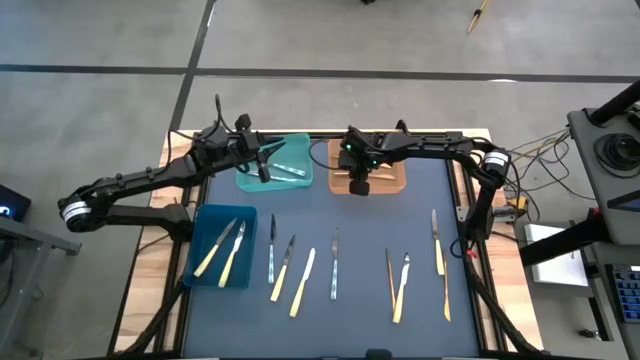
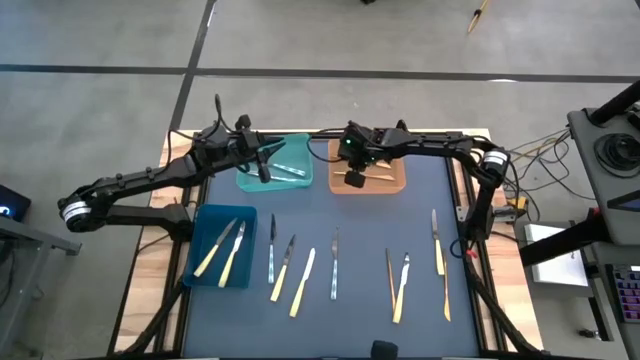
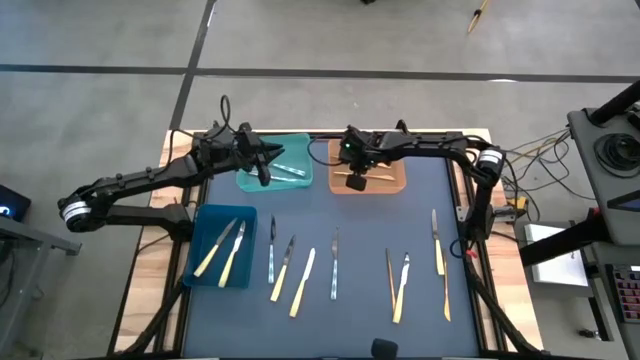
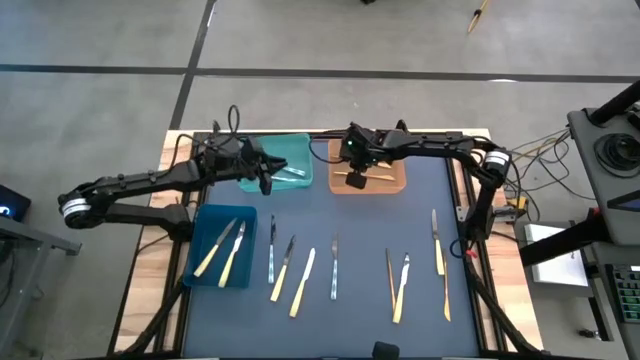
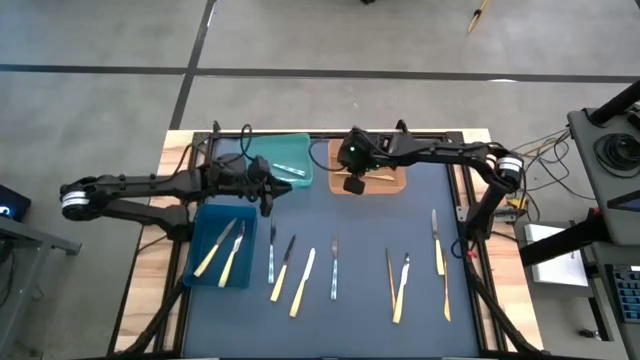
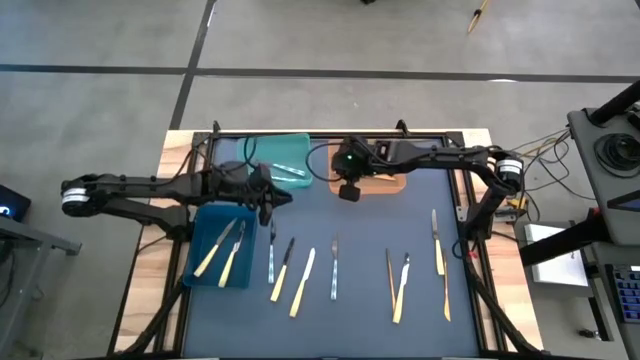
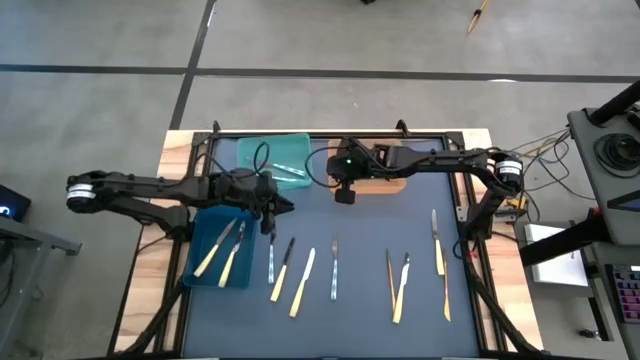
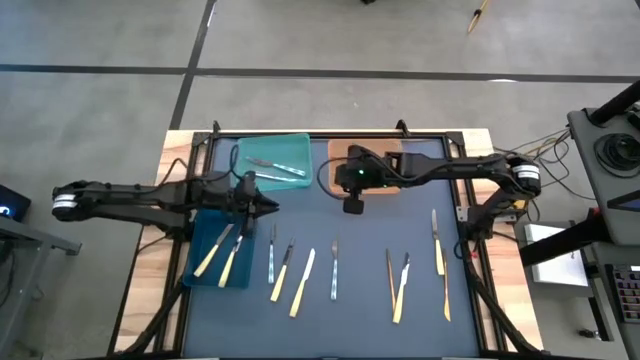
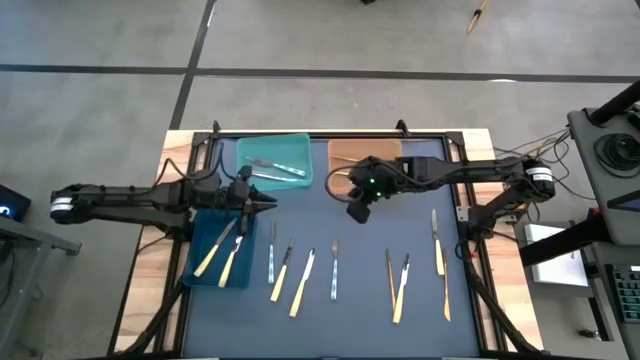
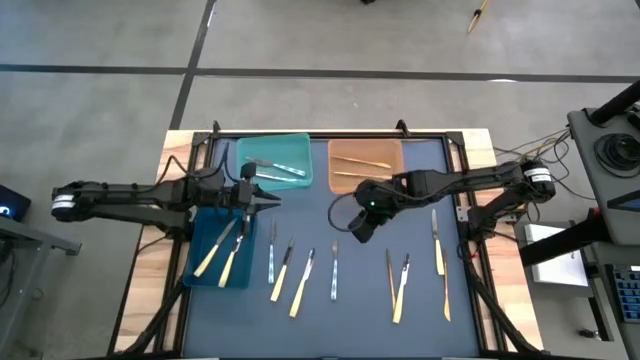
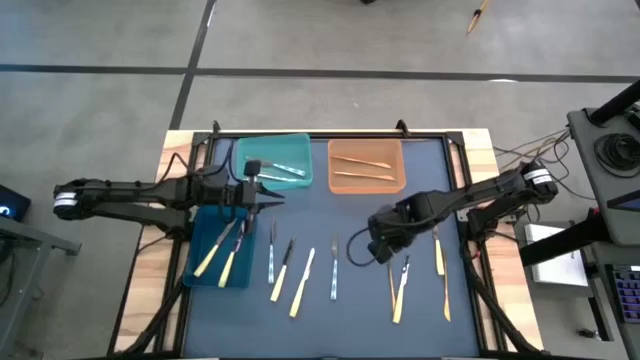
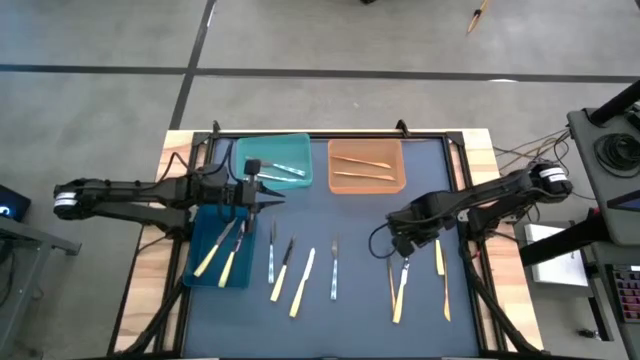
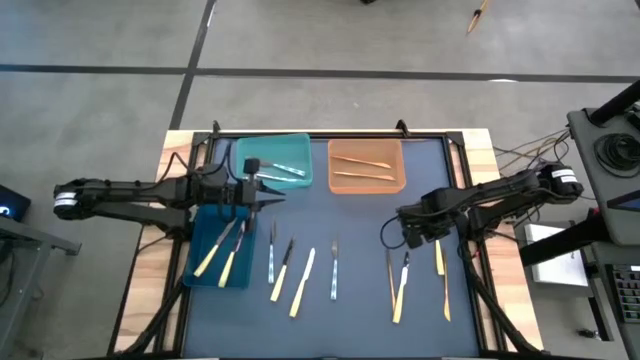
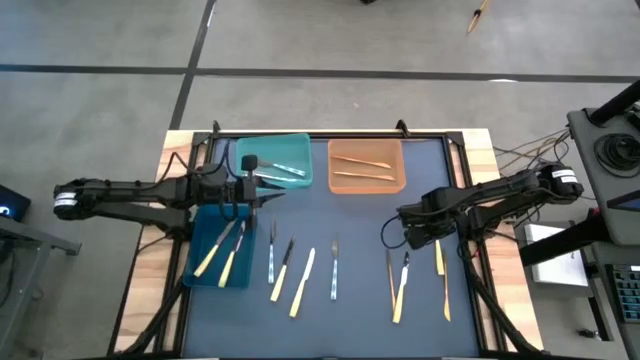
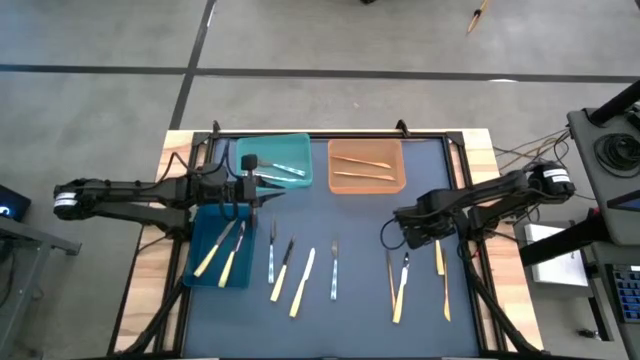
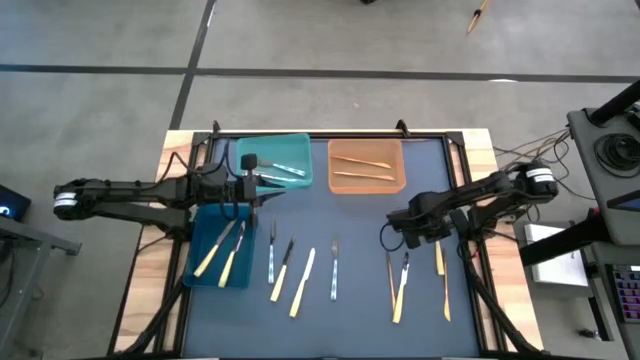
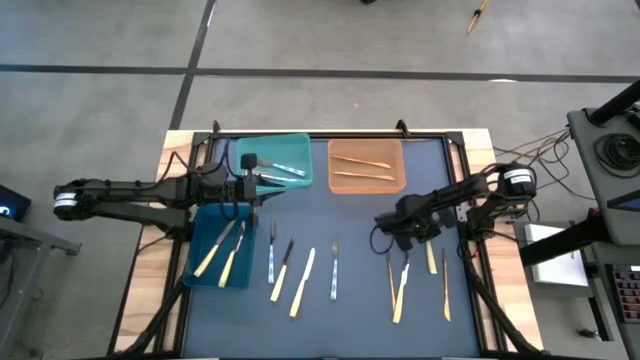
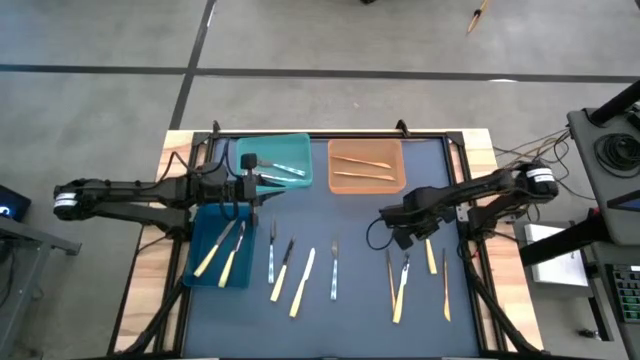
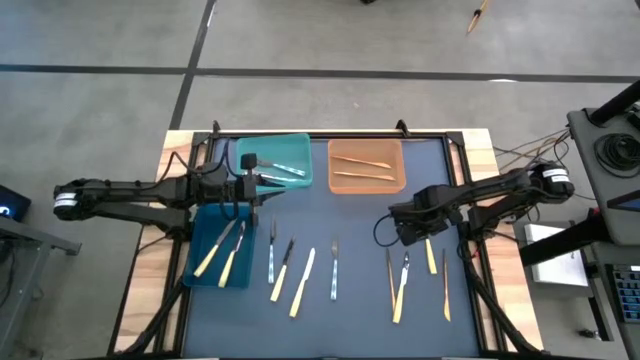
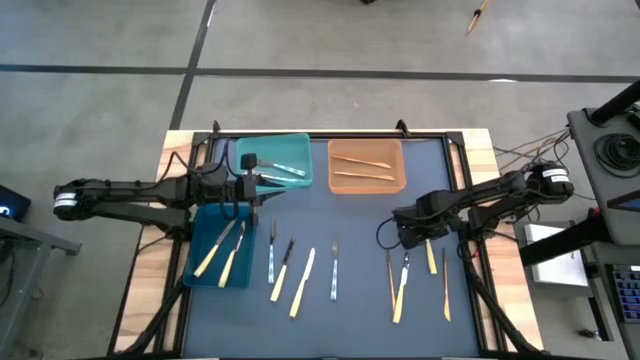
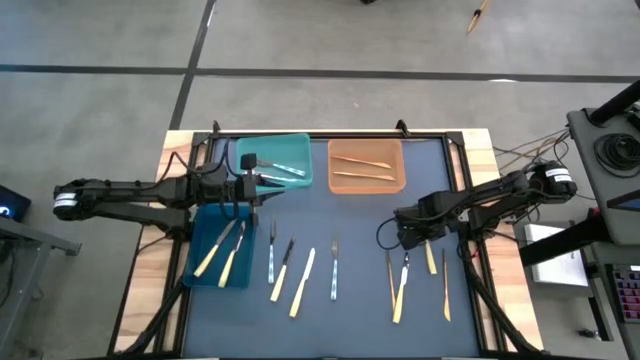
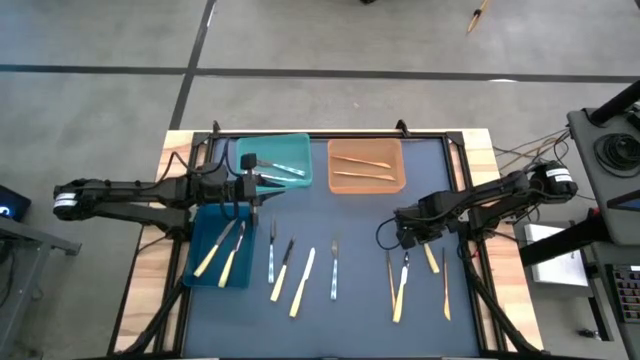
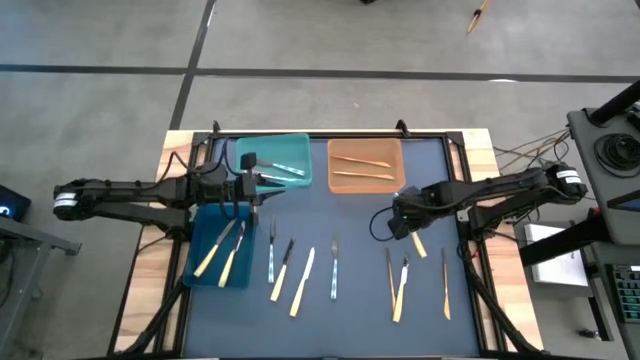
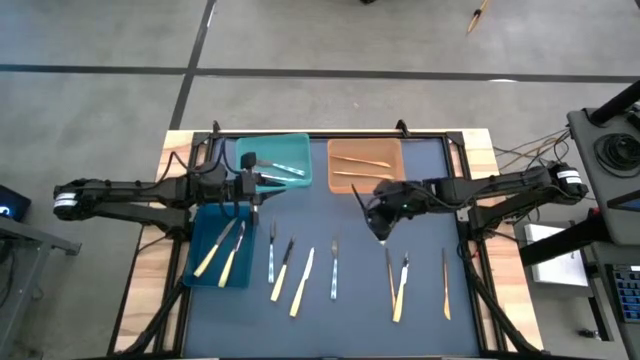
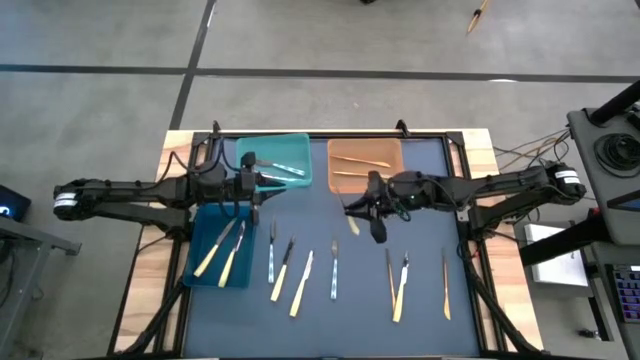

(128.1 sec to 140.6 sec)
Task: Sort silverware by color (type)
Put the light yellow knife into the blue bin

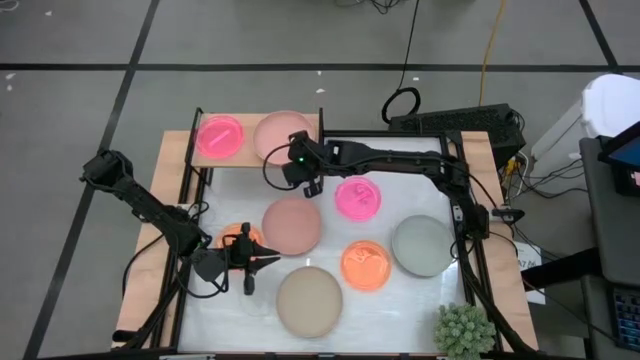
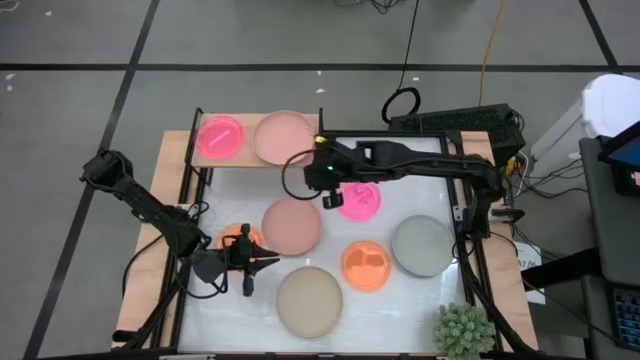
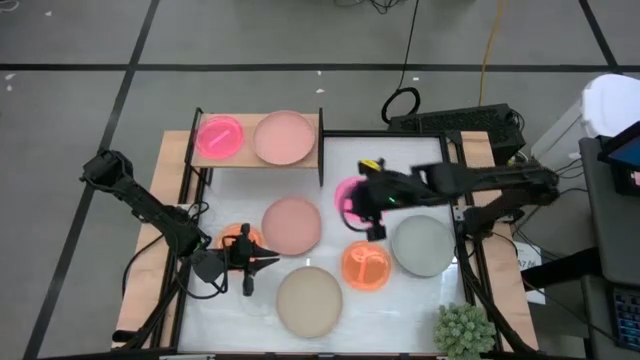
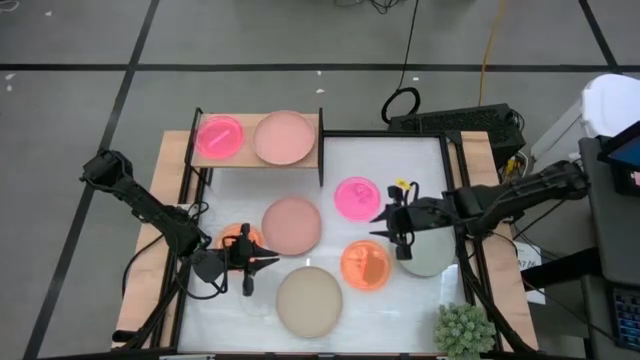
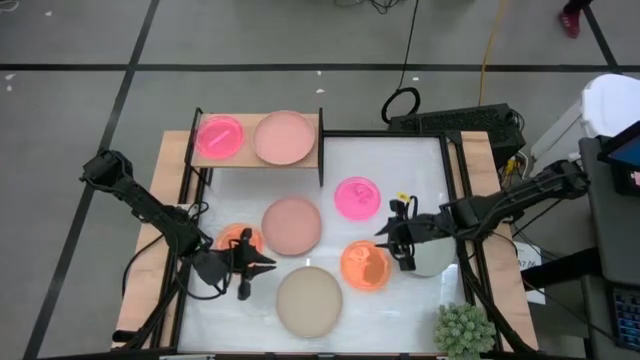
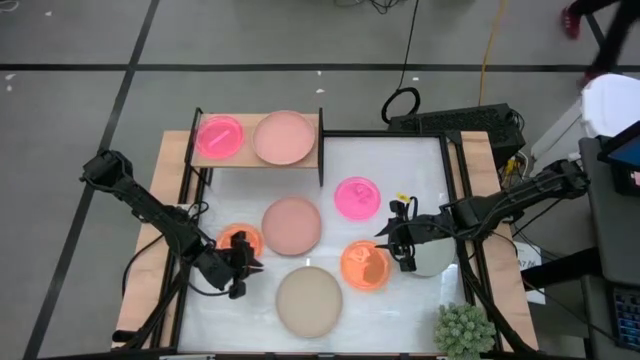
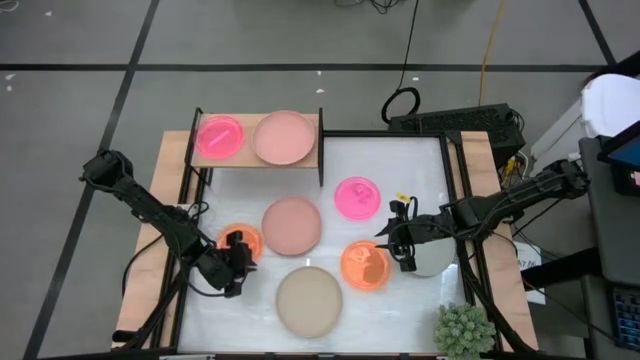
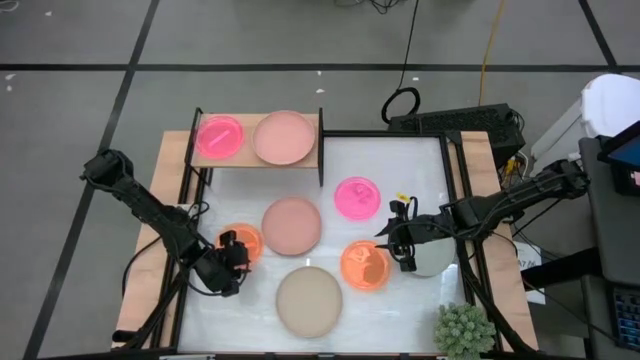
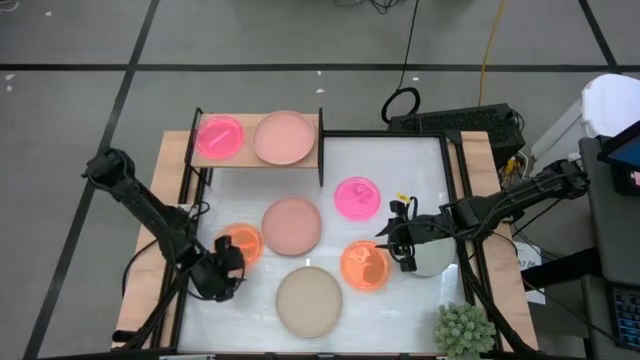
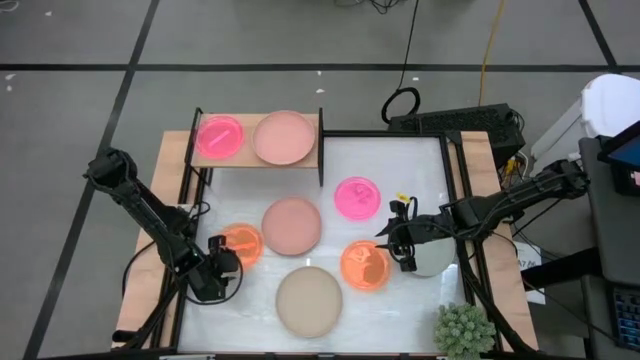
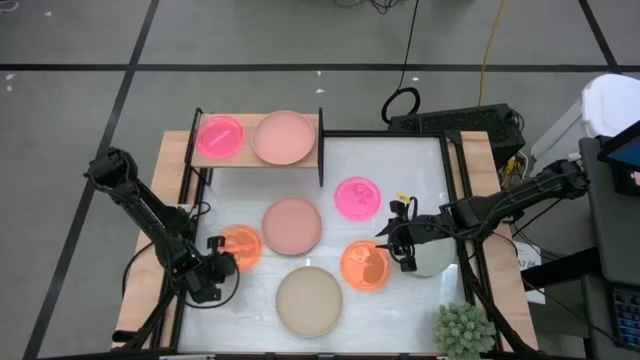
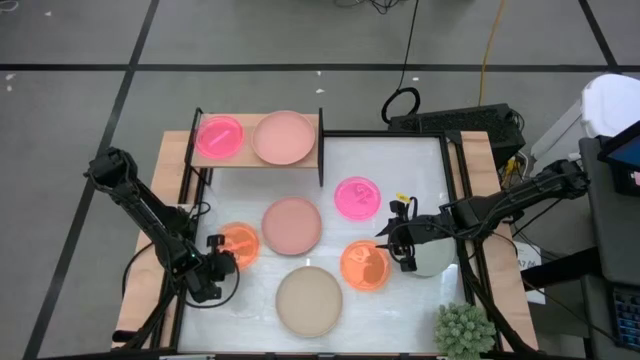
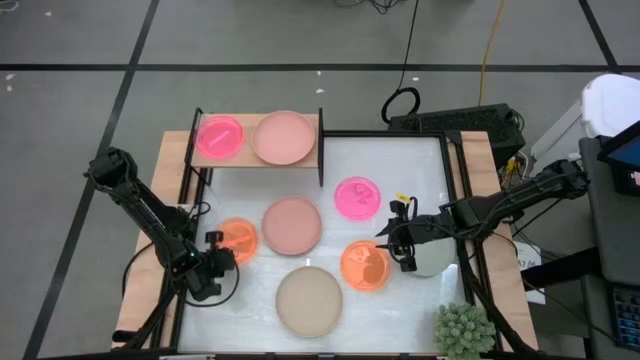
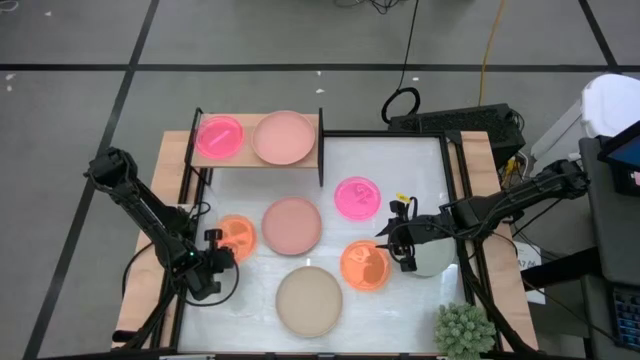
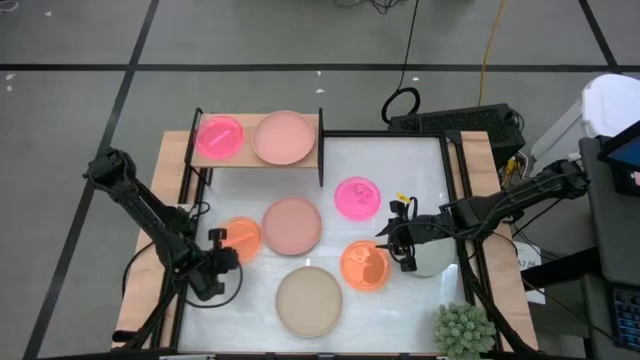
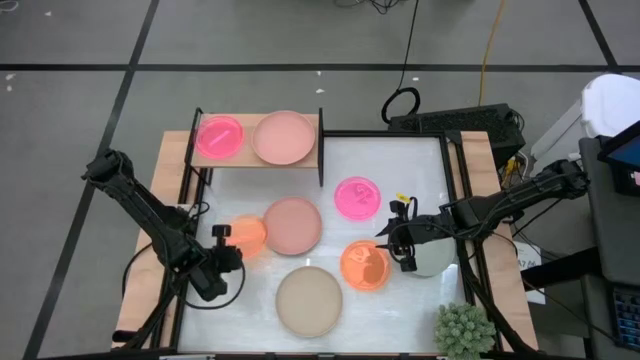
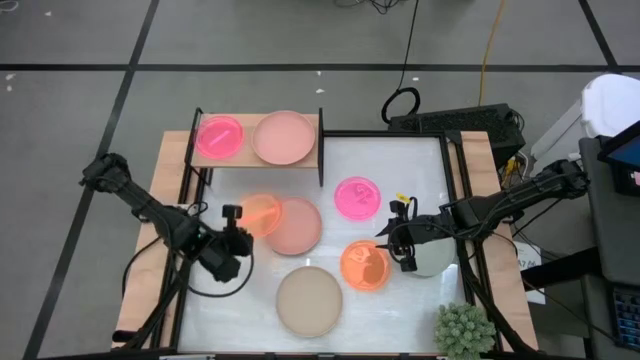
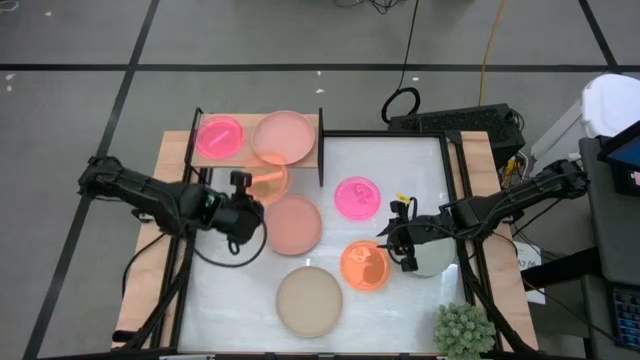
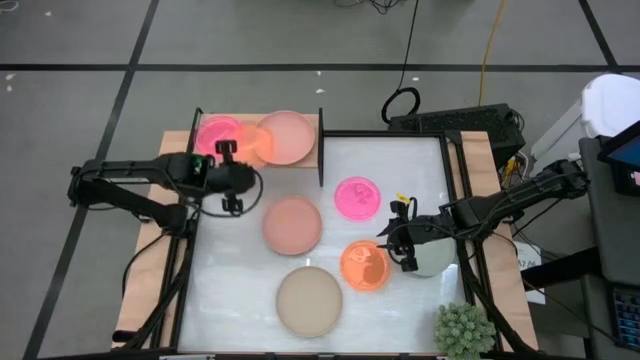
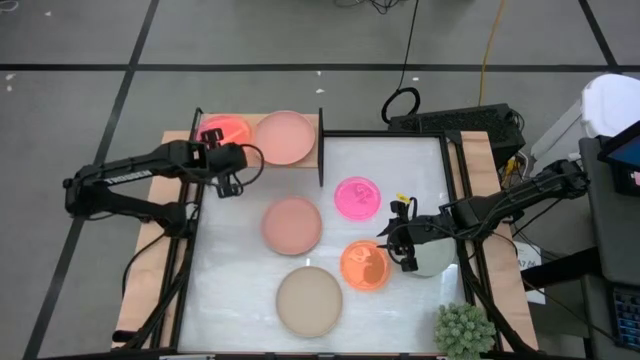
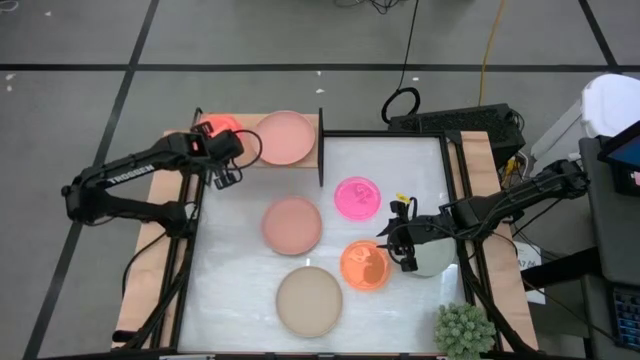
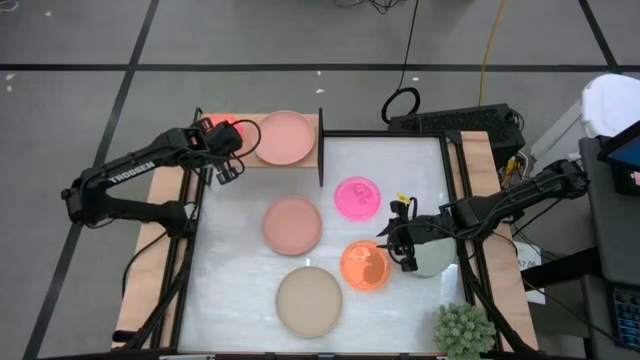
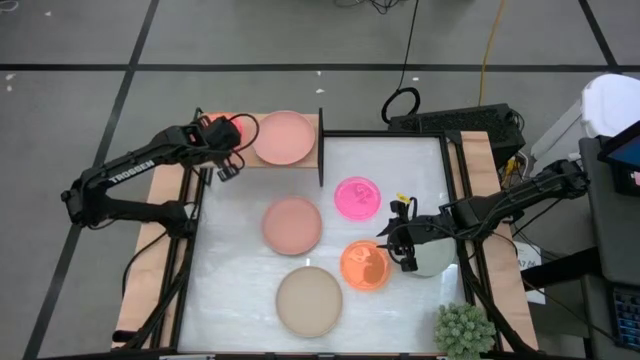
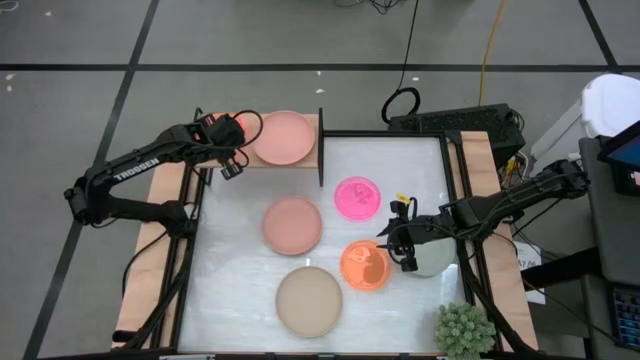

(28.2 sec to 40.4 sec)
Task: Place and stack plates onto a shelf
Stack the left small orange plate on top of the small pink plate on the shelf
